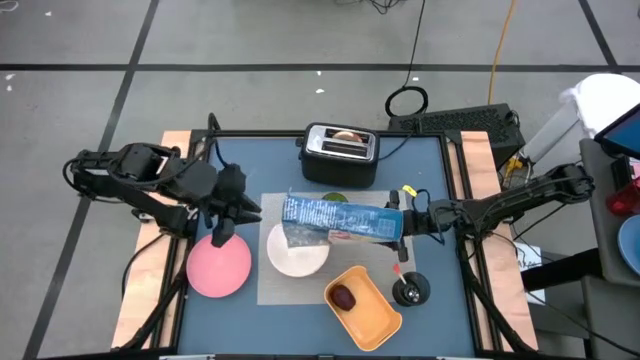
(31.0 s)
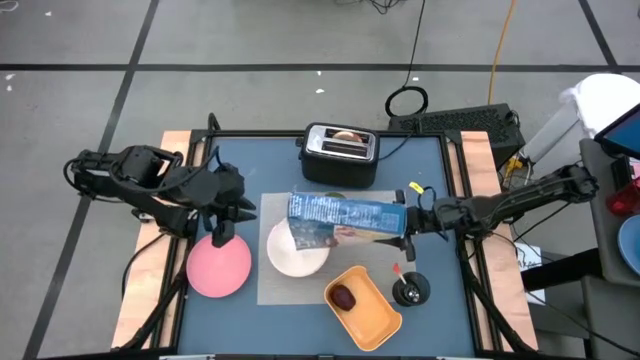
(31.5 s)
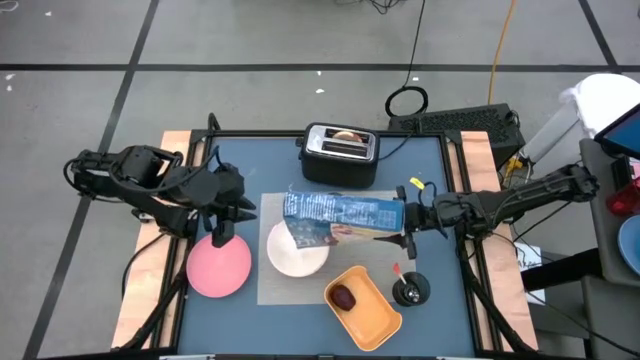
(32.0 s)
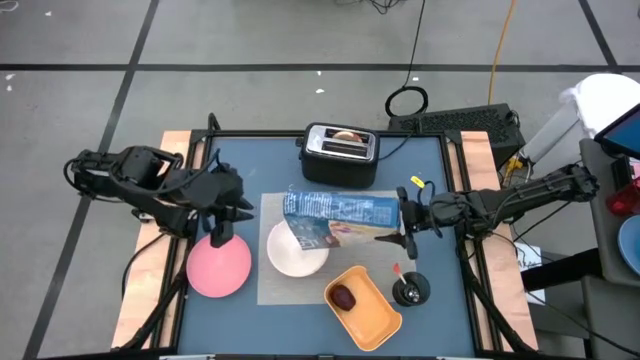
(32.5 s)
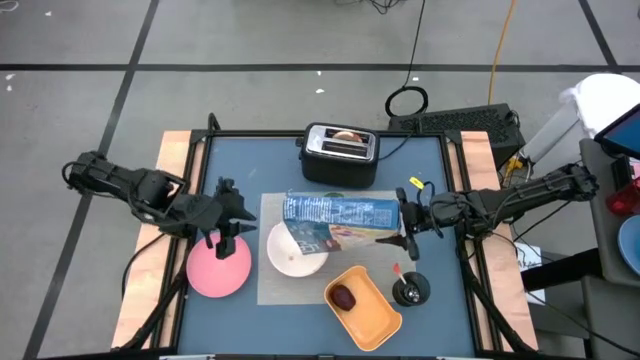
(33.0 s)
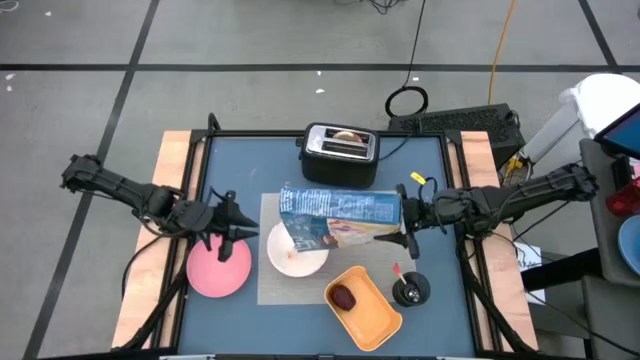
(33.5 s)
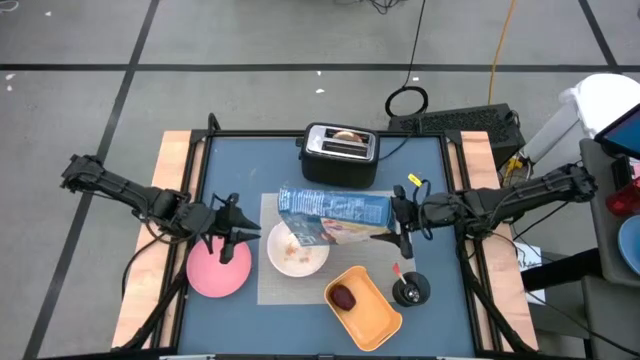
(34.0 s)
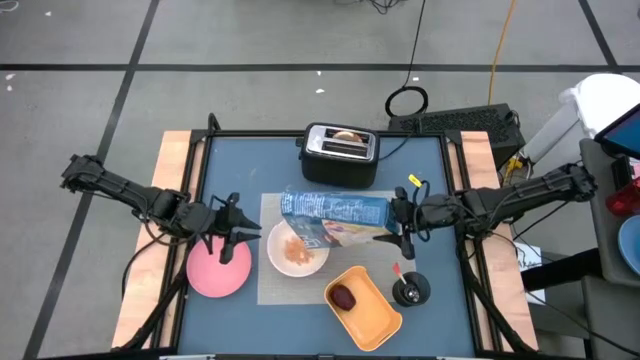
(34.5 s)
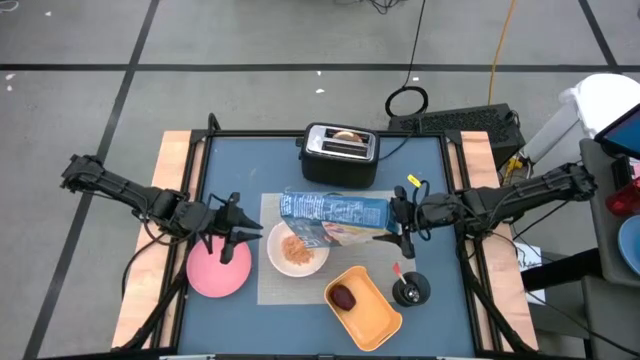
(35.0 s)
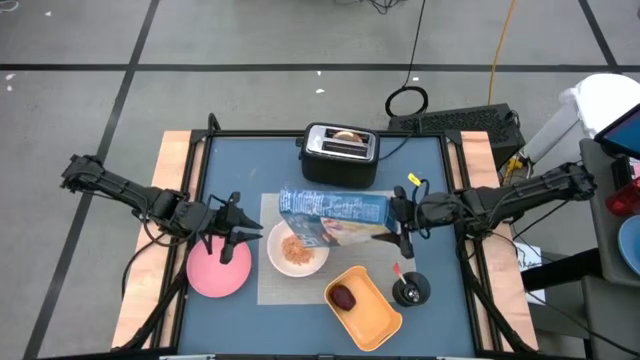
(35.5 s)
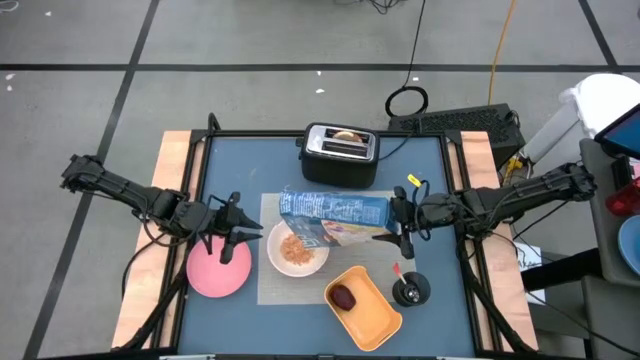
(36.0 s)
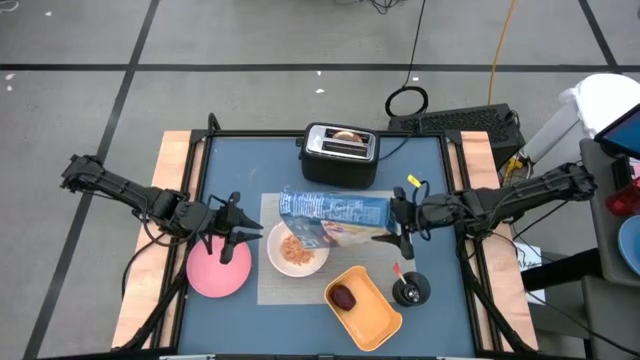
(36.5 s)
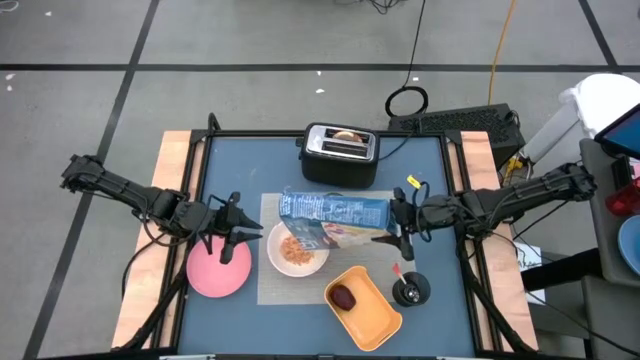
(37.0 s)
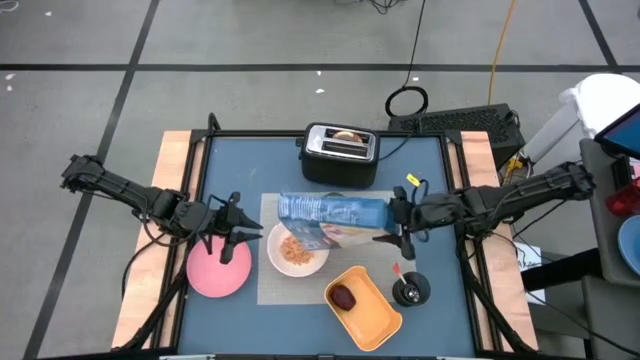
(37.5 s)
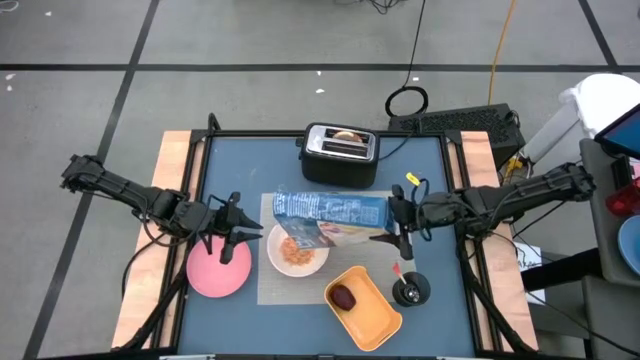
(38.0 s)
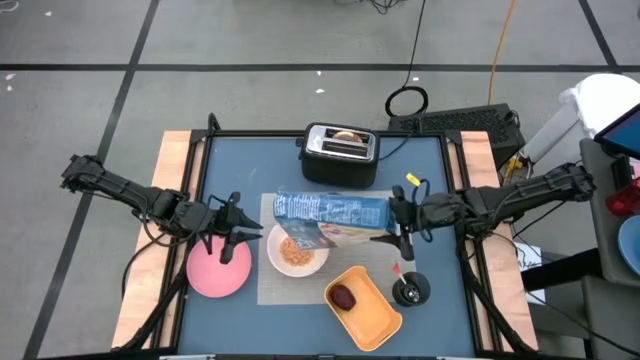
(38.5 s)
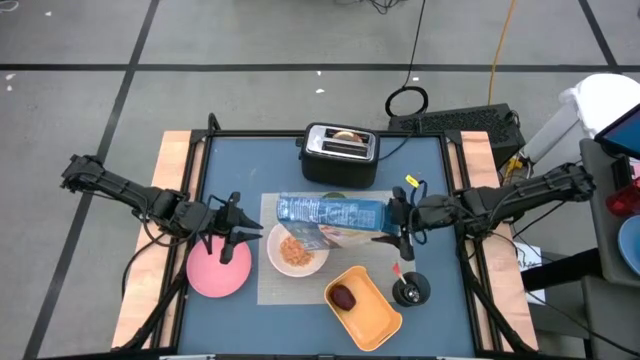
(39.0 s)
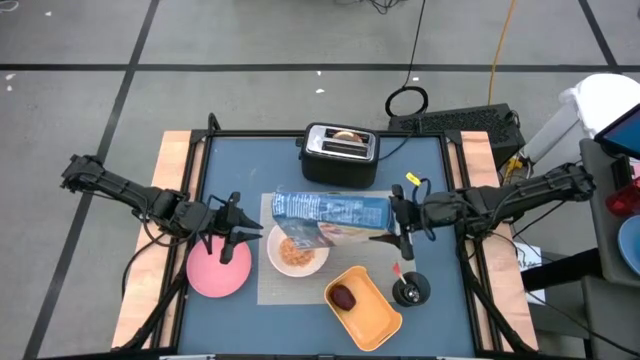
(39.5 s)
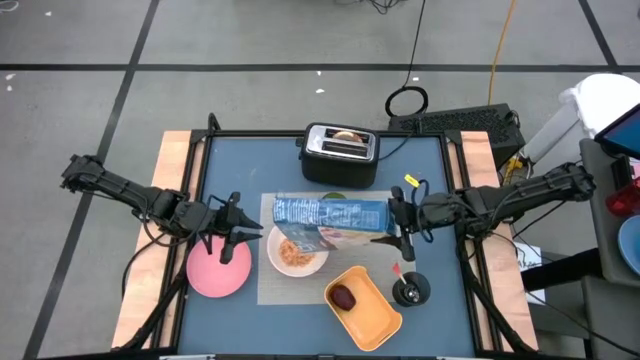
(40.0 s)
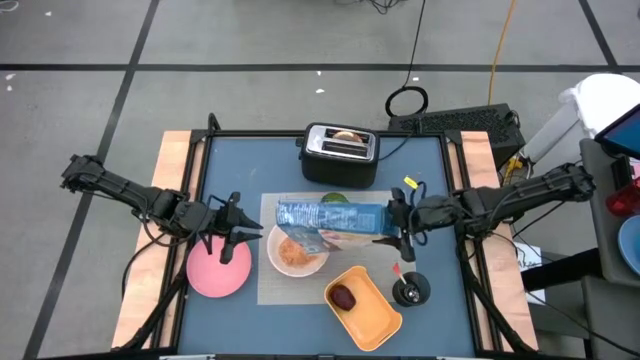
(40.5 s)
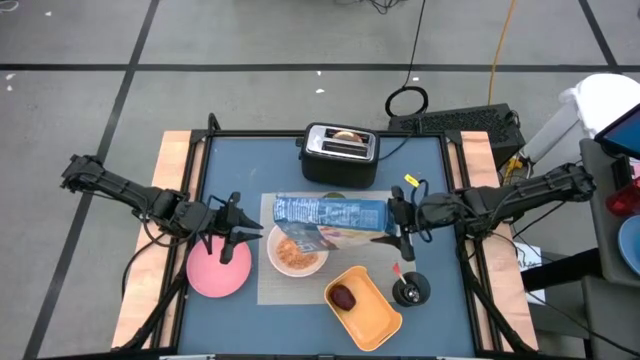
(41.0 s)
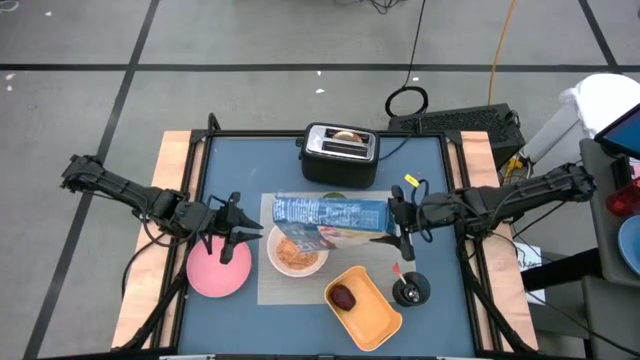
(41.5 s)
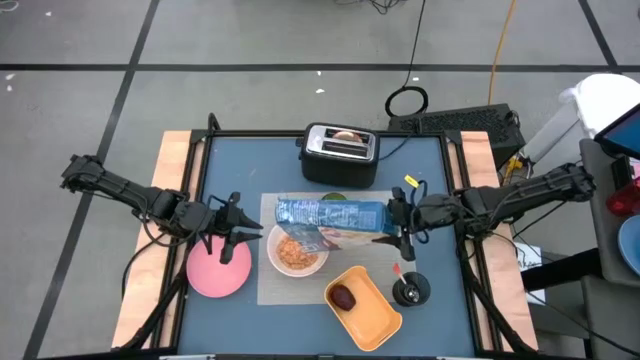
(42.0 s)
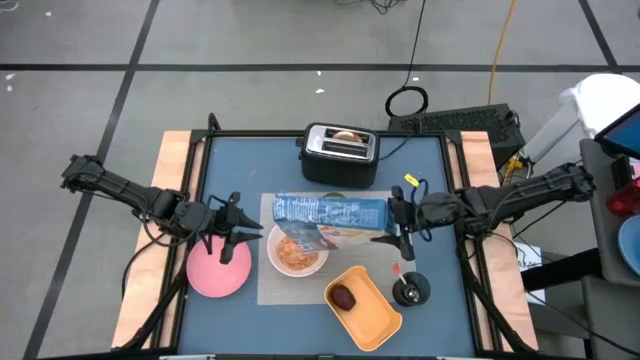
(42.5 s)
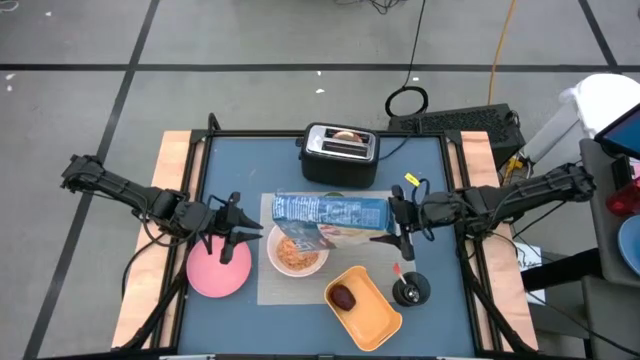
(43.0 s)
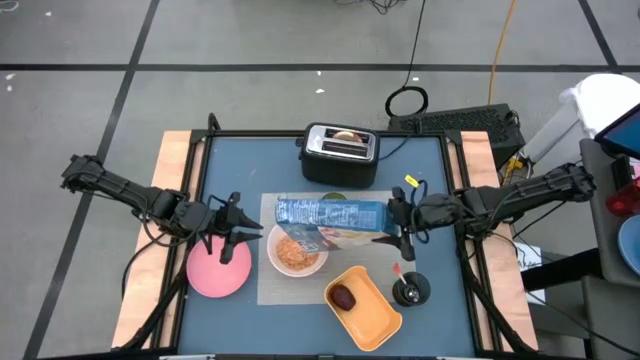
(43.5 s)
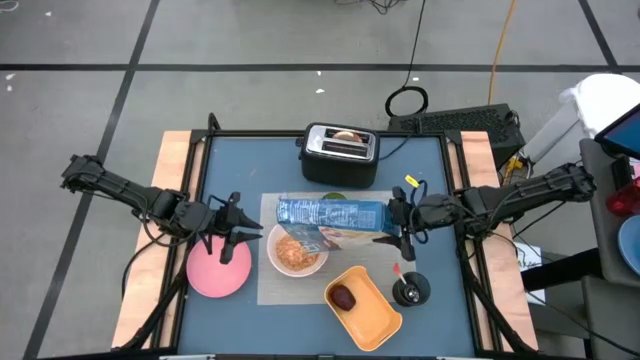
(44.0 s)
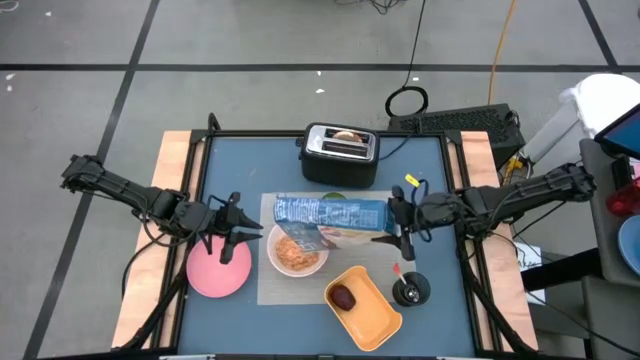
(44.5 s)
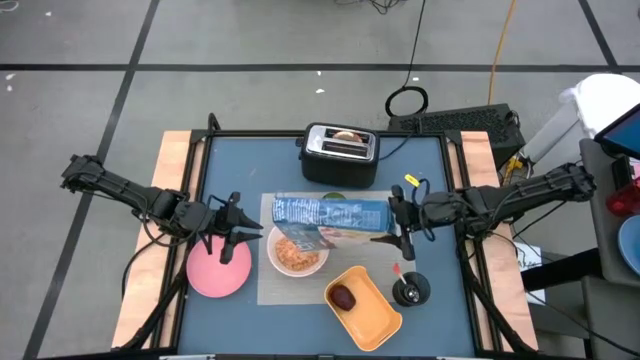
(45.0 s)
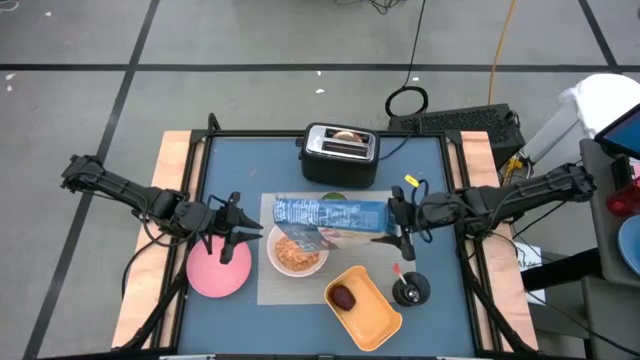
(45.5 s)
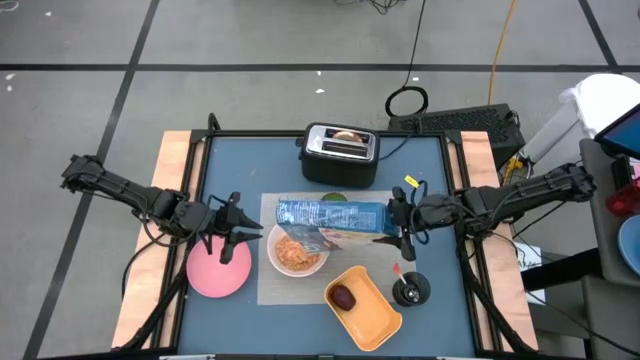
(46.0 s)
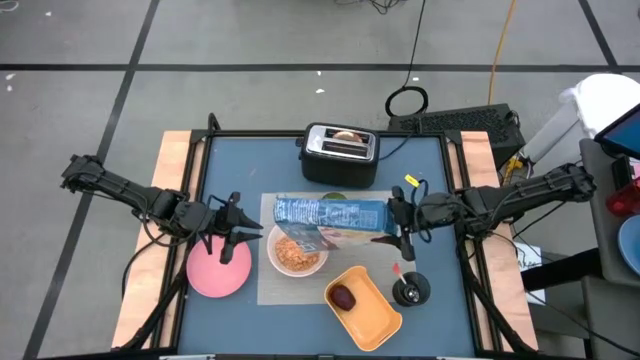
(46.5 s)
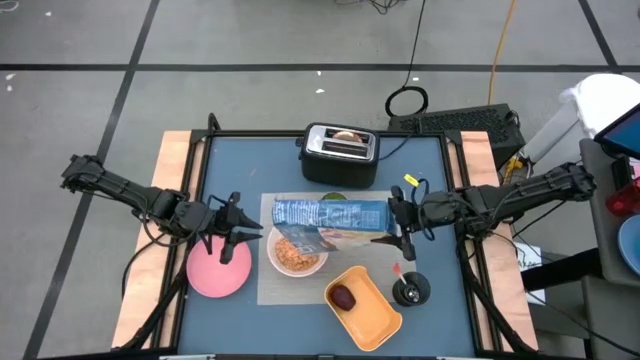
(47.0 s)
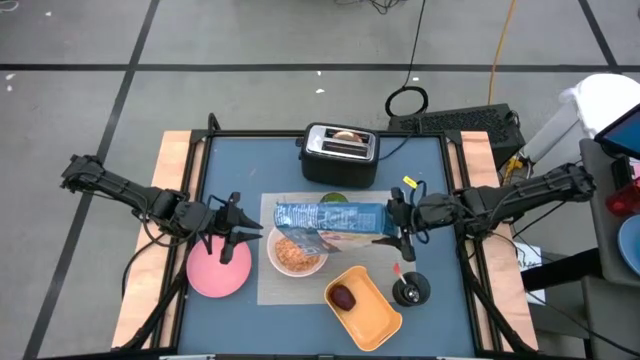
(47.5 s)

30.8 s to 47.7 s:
Task: Arrange a breakfast setting
Pour the cereal into the white bowl

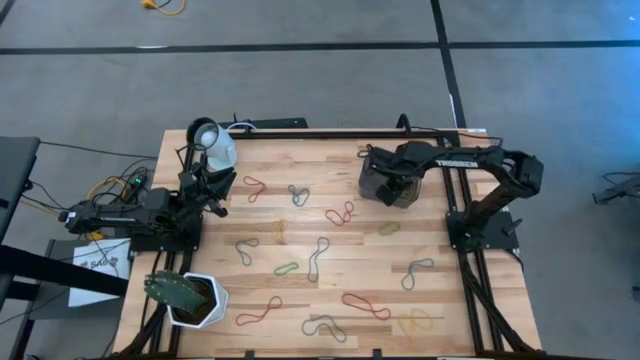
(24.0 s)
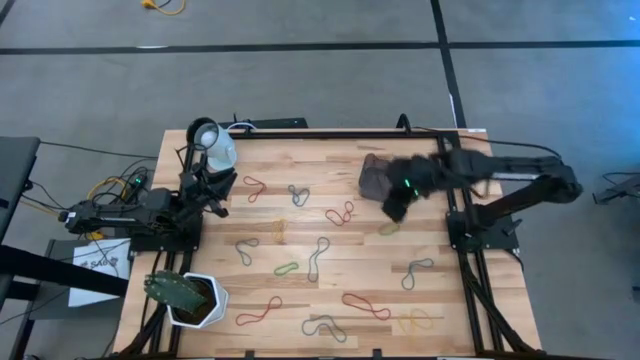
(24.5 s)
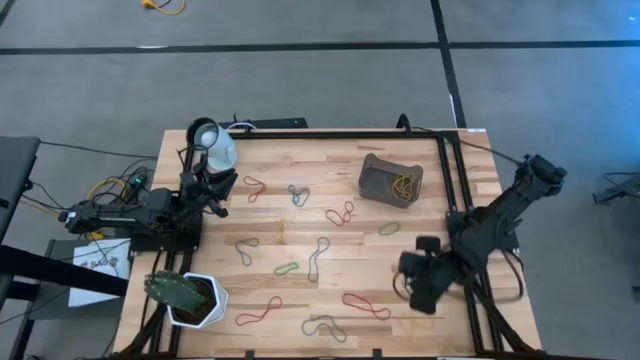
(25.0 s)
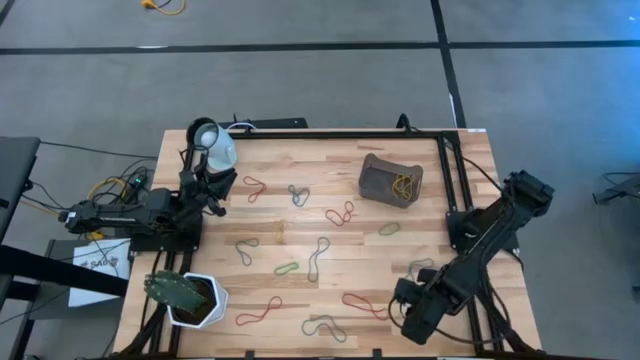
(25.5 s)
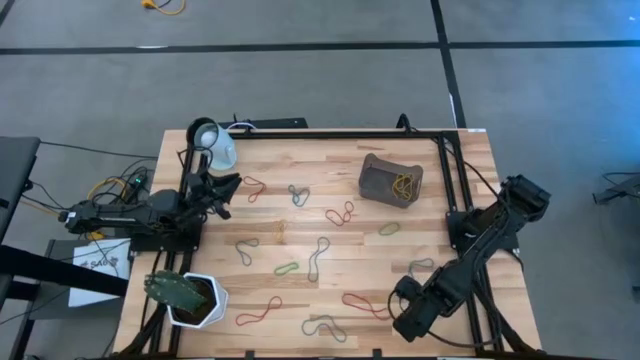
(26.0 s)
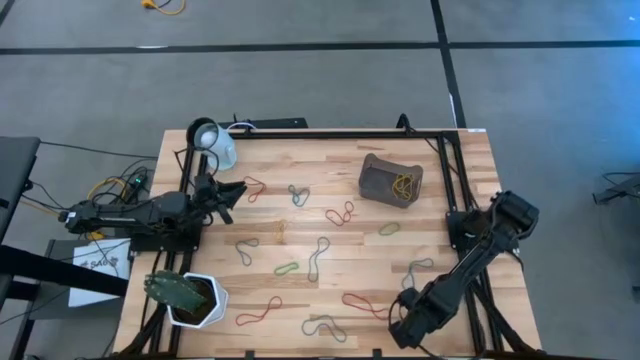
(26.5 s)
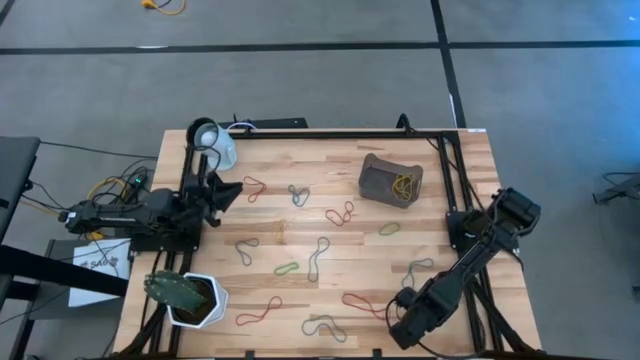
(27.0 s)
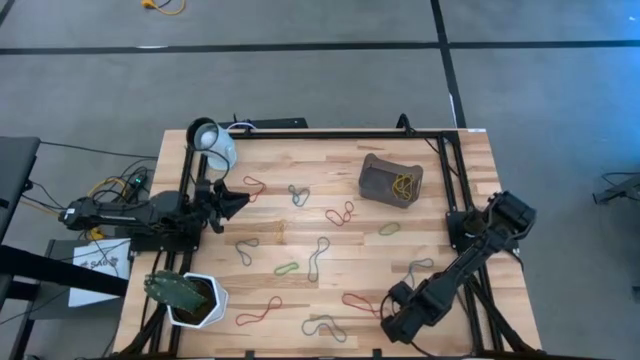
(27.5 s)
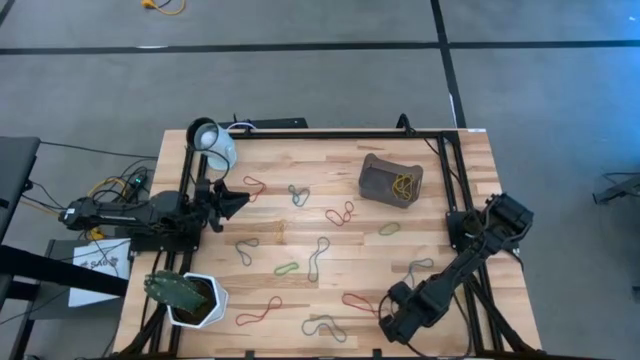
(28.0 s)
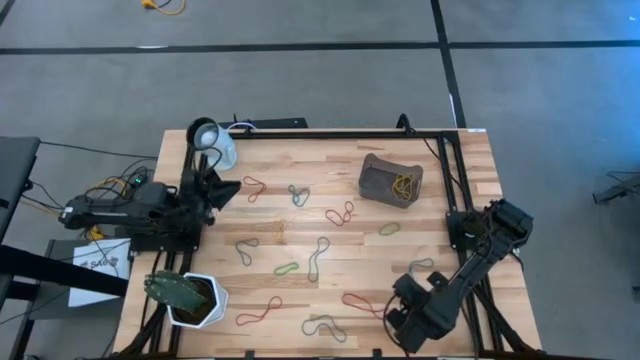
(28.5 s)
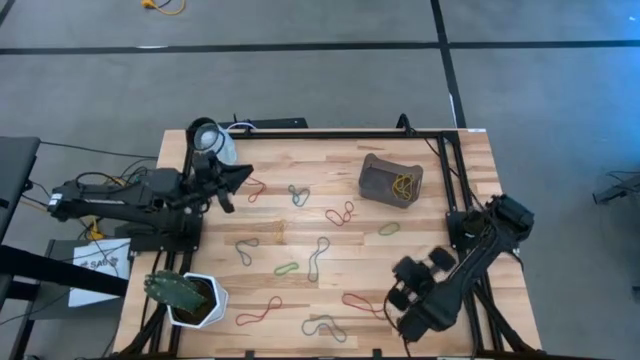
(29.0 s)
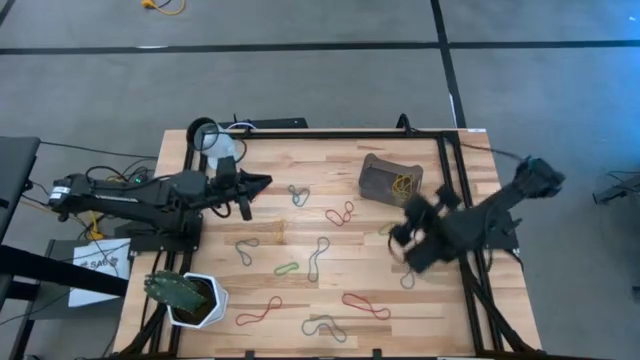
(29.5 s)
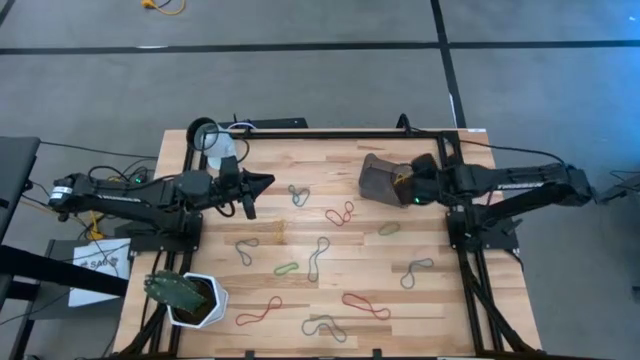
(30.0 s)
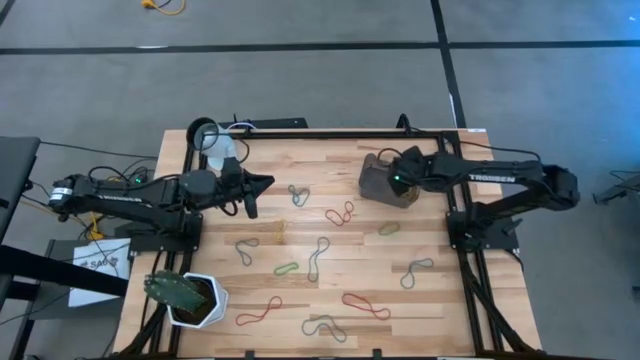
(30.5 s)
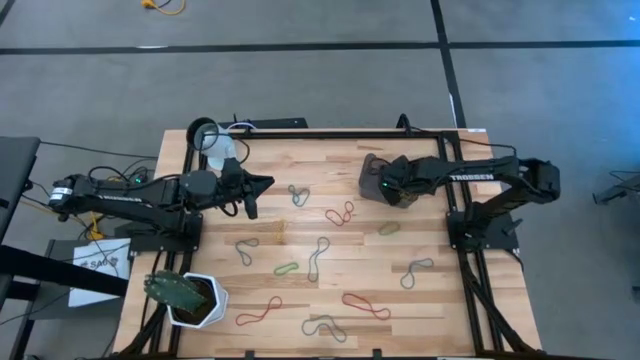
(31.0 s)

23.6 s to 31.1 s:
Task: Pick and place rubber bands into bin
Put the yellow rubber band into the black container
